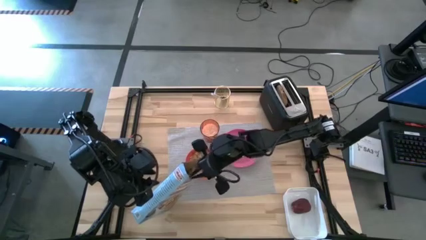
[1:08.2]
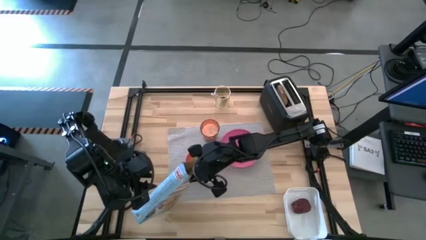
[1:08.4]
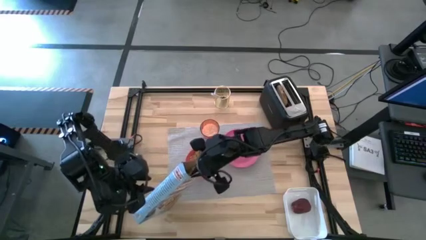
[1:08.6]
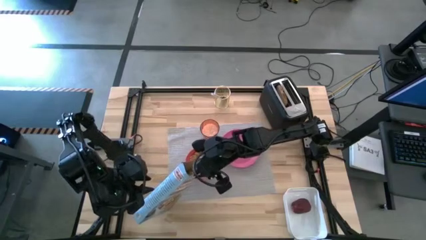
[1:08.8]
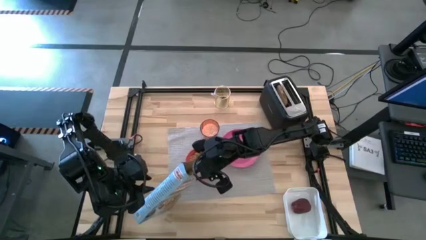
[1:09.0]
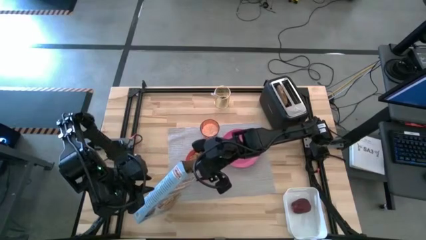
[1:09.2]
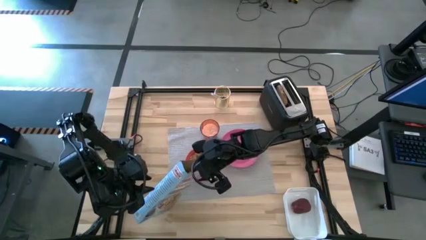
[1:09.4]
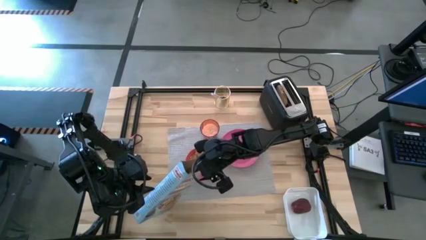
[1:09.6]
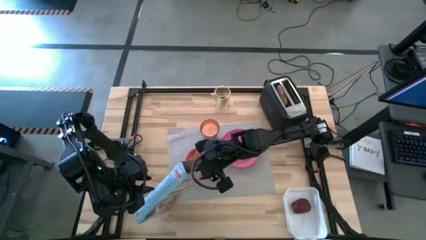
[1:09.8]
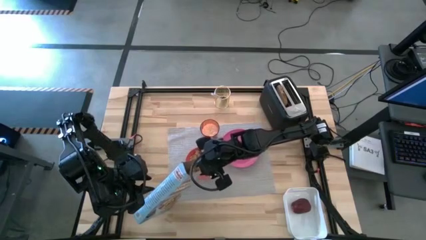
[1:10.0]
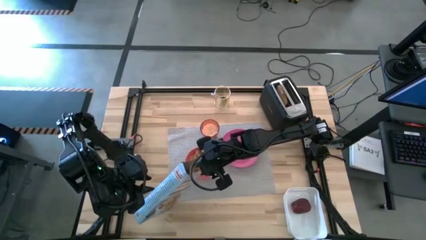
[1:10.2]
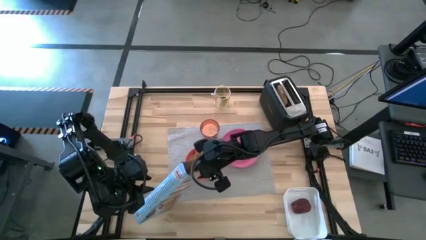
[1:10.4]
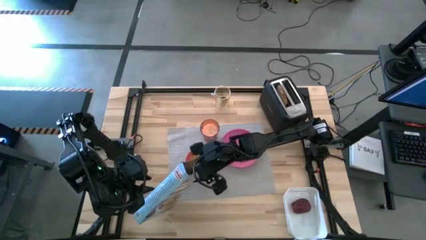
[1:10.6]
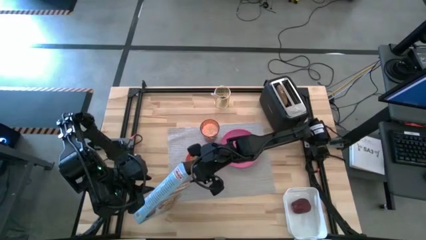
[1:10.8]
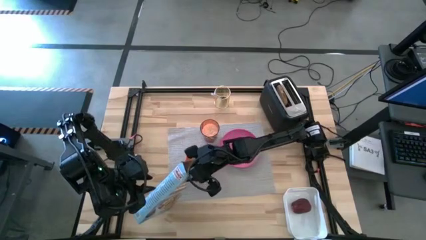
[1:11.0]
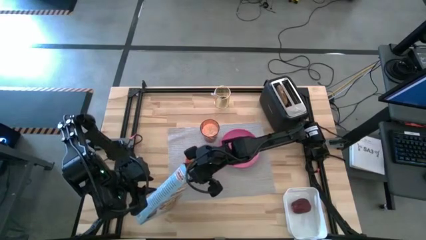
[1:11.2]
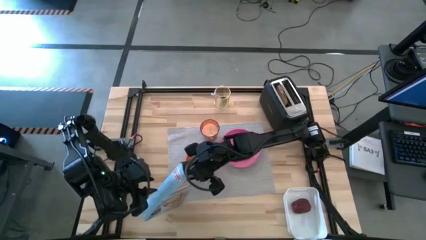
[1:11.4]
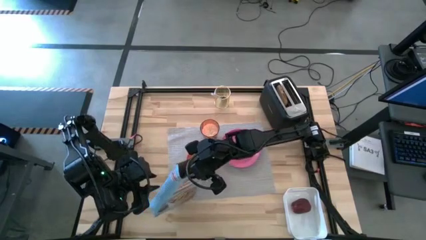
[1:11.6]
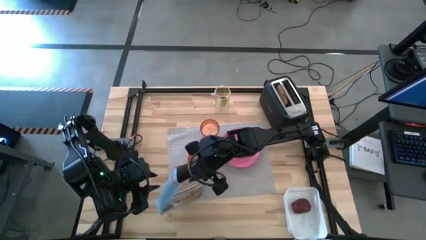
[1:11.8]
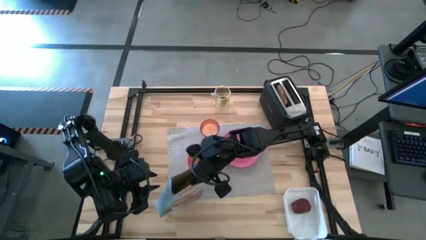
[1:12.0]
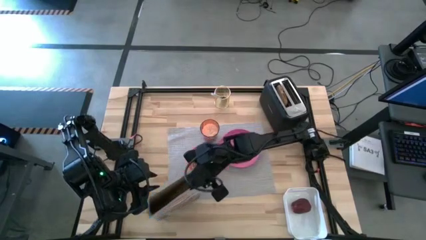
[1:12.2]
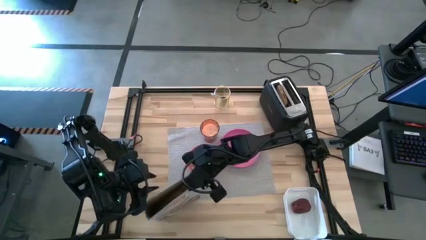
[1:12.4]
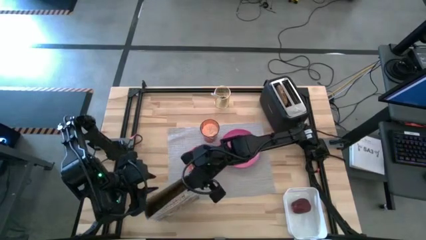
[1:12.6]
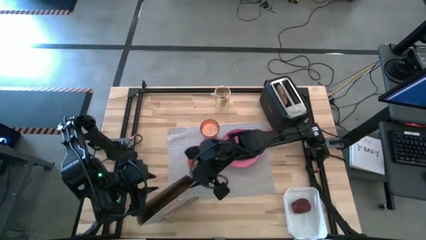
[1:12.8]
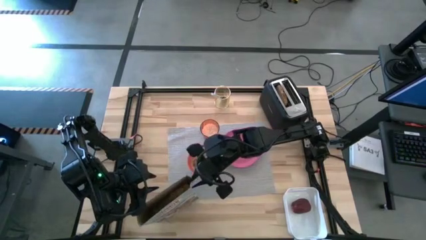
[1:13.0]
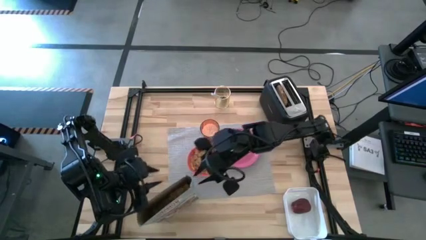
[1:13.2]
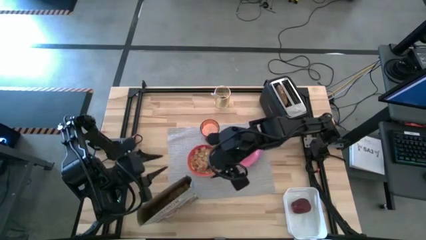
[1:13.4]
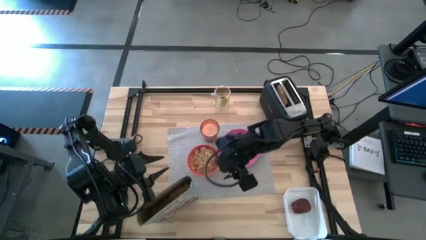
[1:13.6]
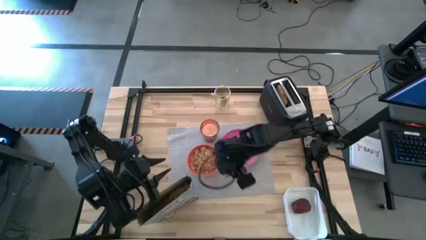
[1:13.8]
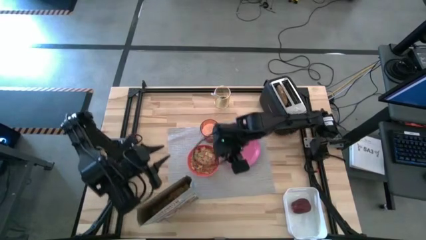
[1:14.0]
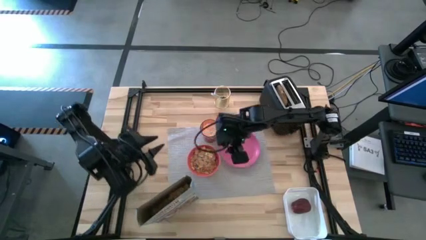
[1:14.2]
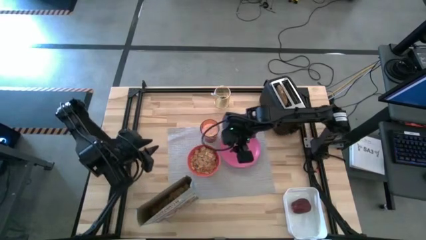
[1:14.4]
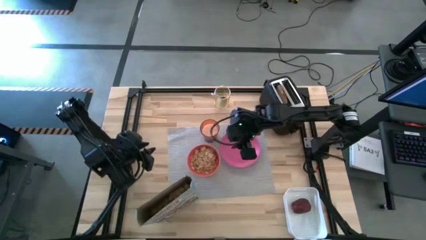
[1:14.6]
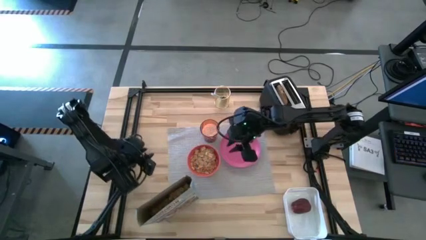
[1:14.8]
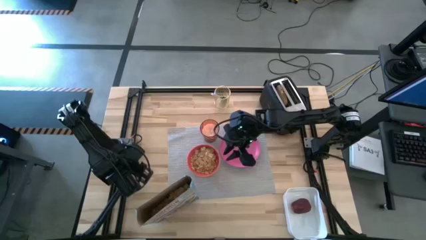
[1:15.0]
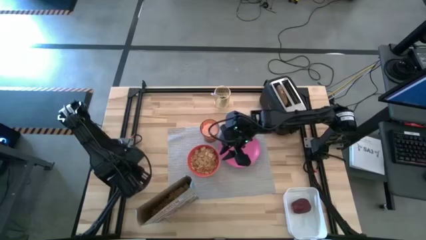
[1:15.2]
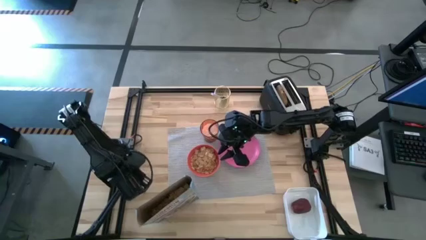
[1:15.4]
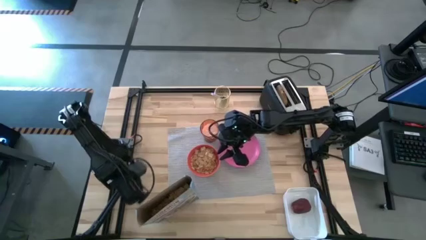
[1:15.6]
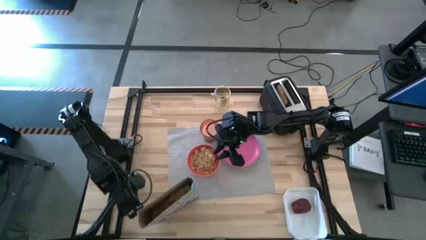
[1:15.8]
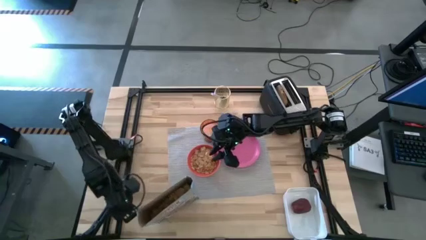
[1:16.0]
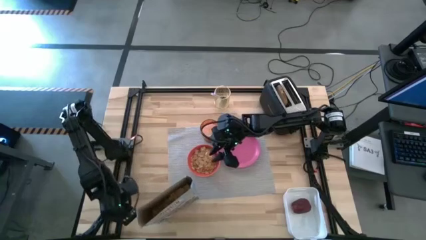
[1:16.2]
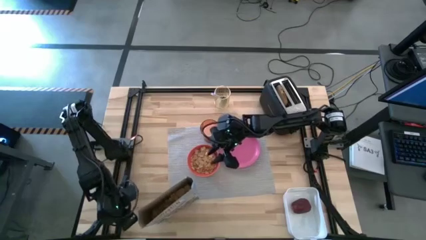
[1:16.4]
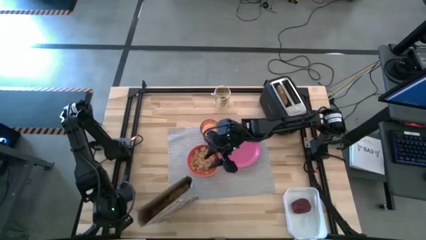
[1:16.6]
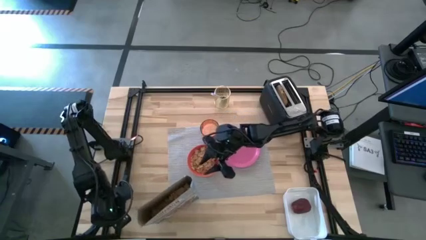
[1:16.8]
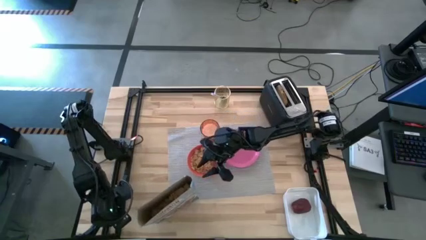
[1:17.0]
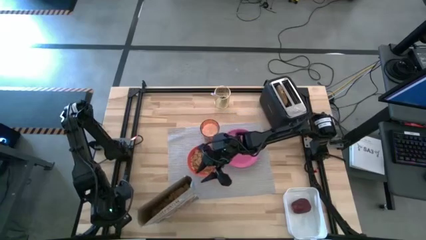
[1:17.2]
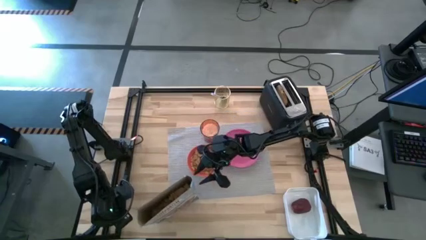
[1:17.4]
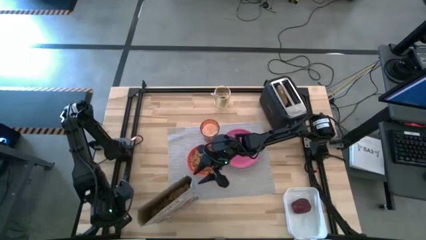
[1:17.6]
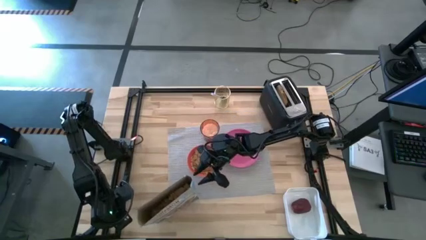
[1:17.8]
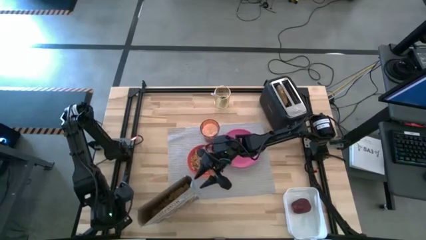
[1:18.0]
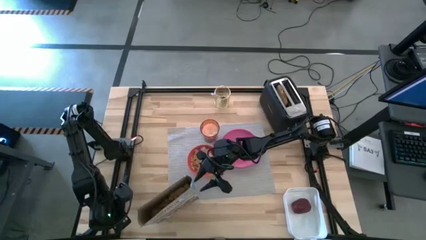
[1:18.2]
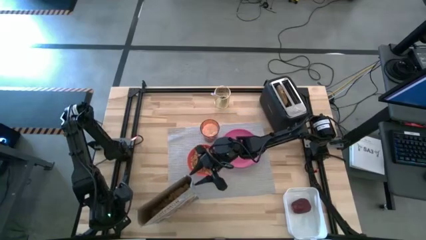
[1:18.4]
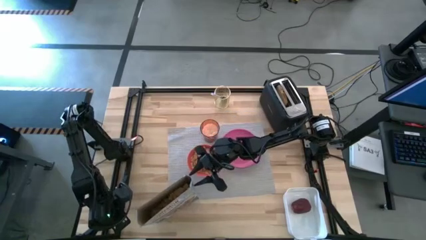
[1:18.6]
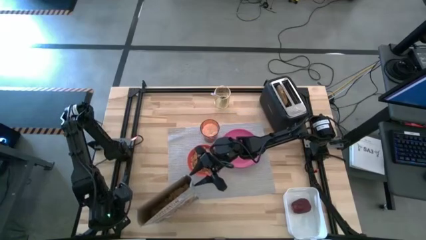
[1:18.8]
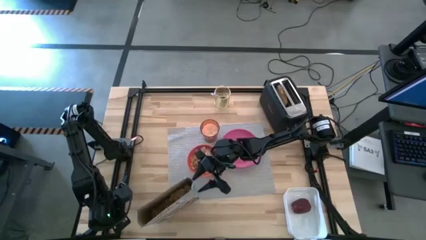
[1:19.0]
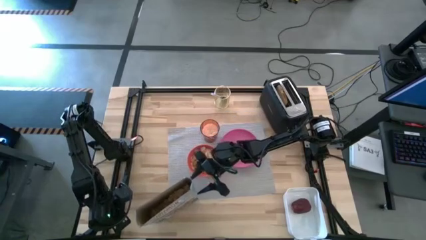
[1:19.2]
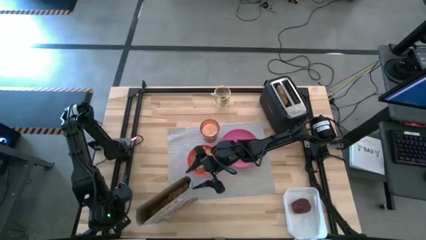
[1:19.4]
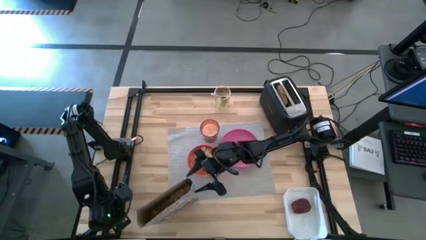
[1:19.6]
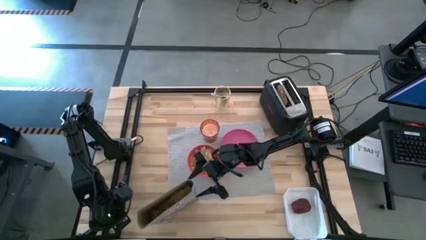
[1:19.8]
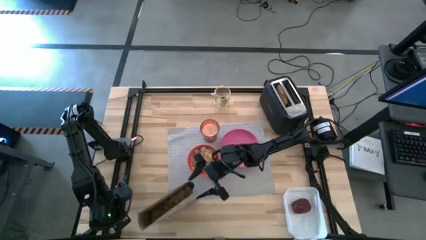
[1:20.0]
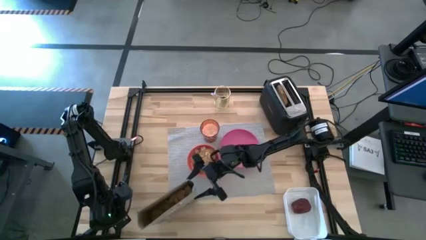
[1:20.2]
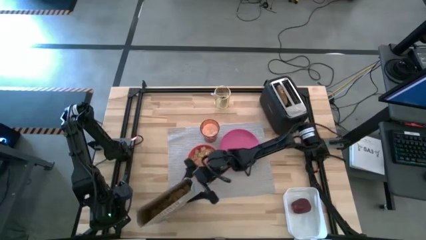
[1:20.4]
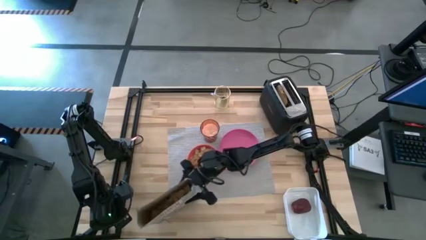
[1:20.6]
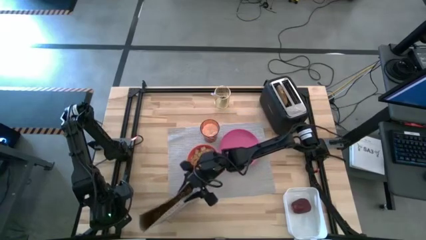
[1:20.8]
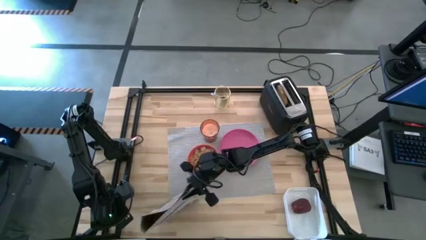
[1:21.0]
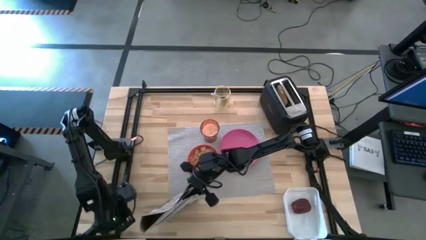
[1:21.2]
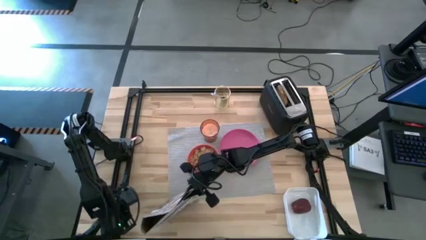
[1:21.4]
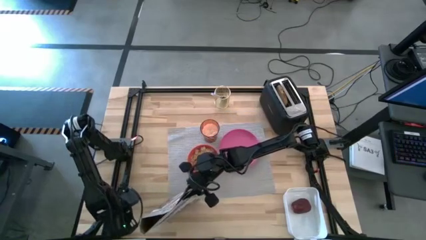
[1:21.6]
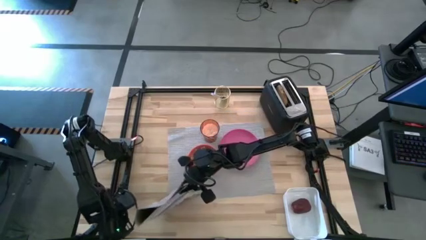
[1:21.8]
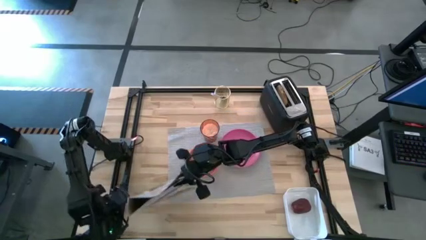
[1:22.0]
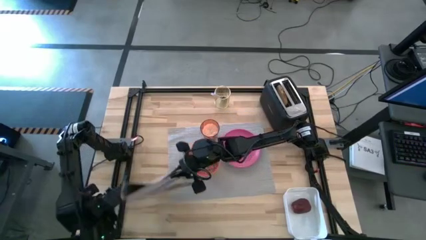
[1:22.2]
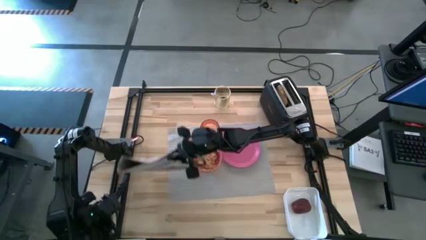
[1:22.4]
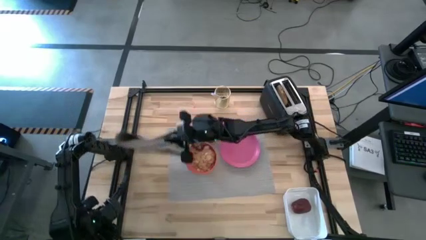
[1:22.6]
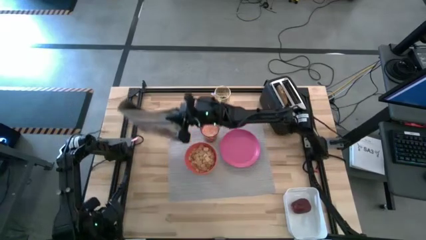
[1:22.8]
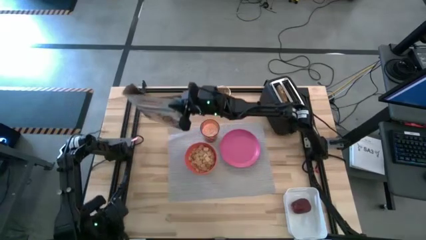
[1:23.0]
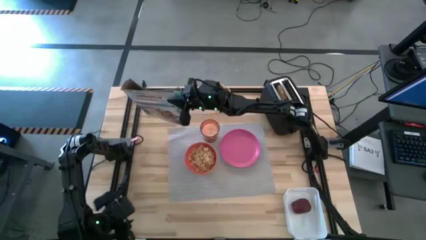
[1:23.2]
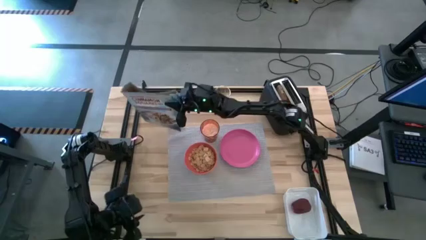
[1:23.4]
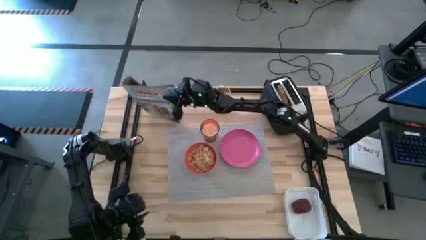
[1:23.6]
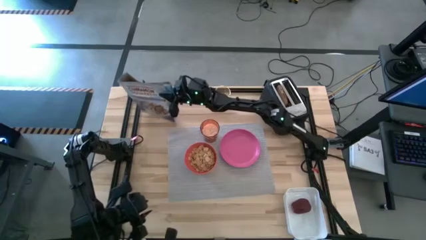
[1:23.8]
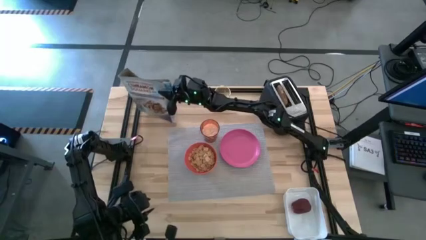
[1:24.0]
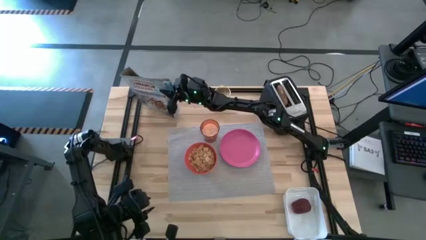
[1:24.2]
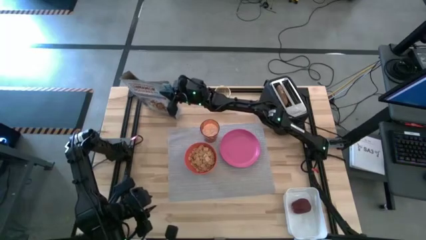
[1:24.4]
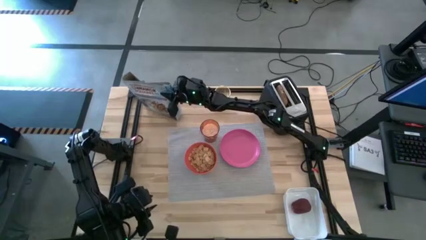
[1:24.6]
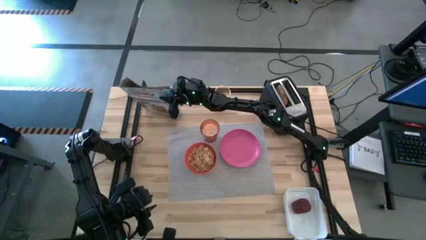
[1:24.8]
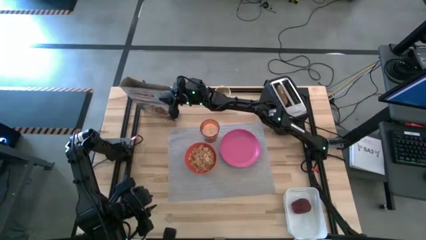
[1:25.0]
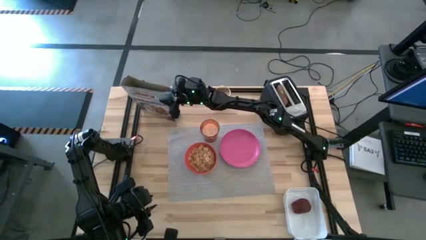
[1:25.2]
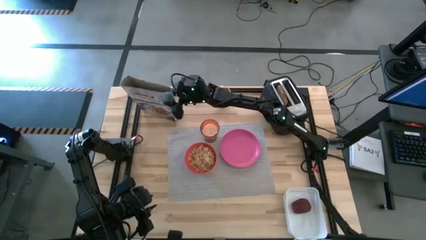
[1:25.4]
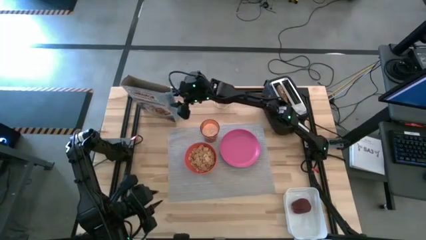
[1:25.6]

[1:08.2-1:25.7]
Task: Arrange a breakfast setting
Pour the cereal from the blue cereal box into the orange bowl
